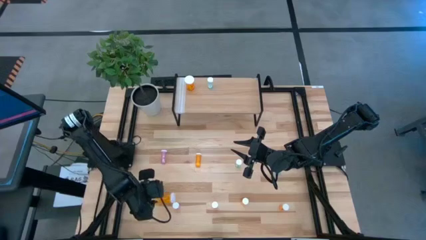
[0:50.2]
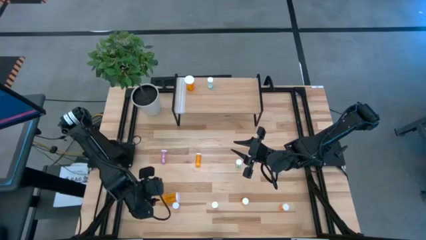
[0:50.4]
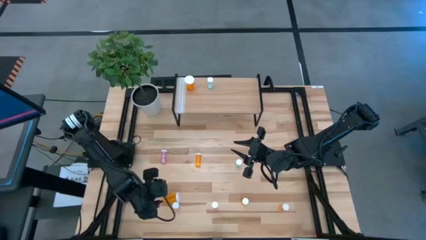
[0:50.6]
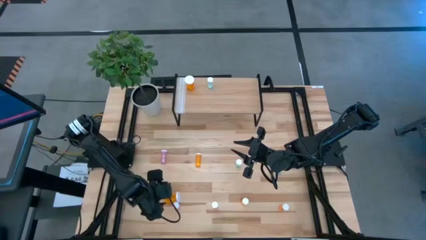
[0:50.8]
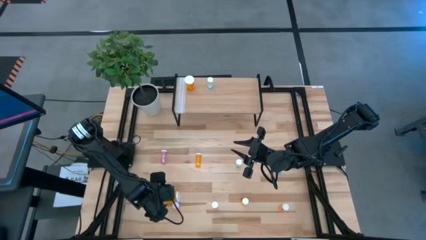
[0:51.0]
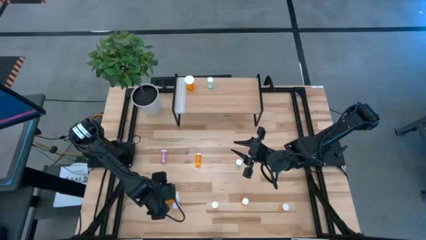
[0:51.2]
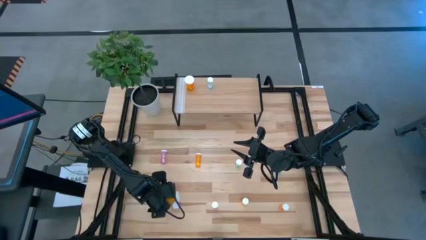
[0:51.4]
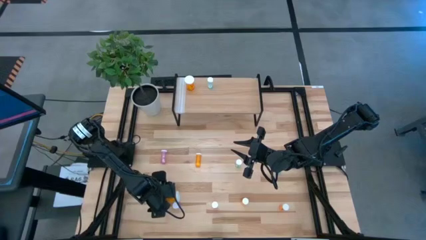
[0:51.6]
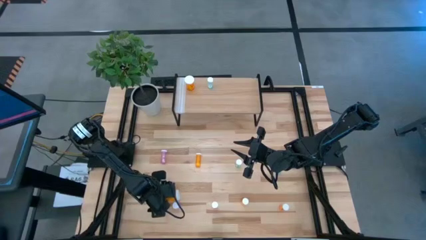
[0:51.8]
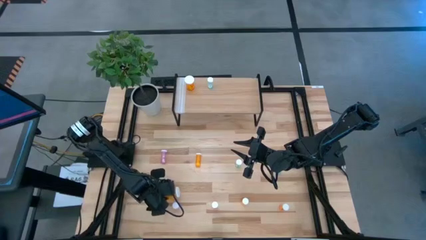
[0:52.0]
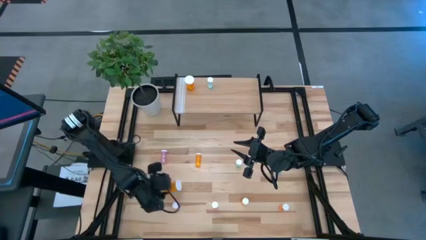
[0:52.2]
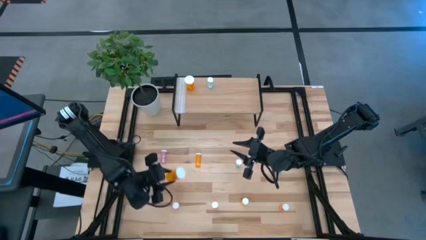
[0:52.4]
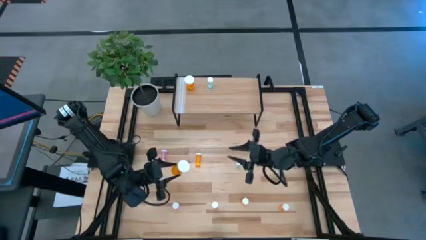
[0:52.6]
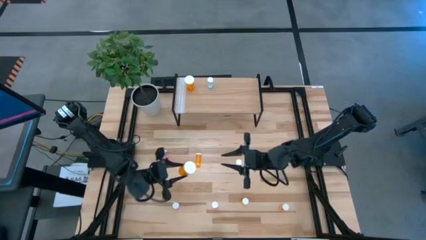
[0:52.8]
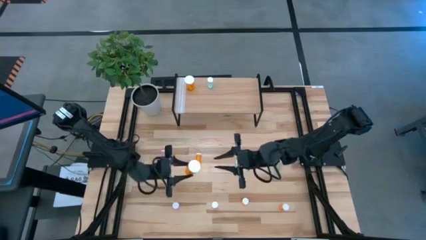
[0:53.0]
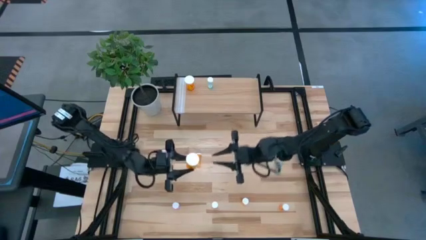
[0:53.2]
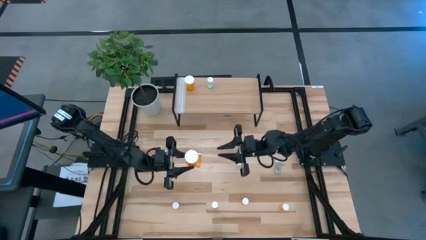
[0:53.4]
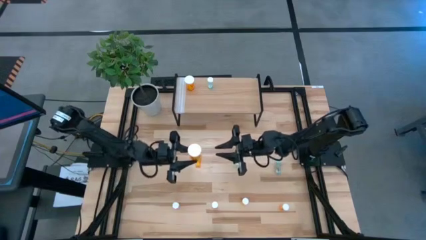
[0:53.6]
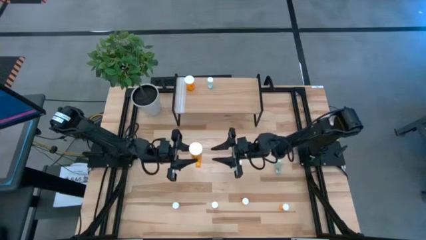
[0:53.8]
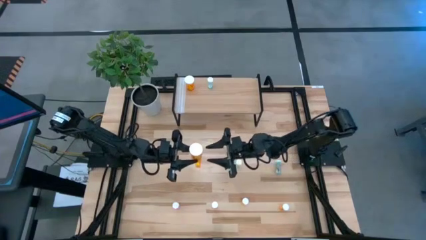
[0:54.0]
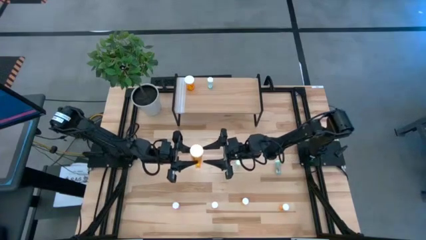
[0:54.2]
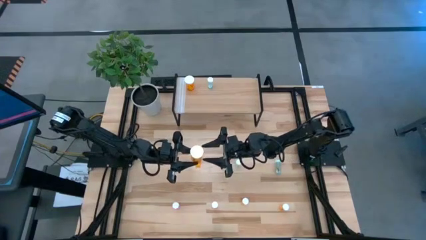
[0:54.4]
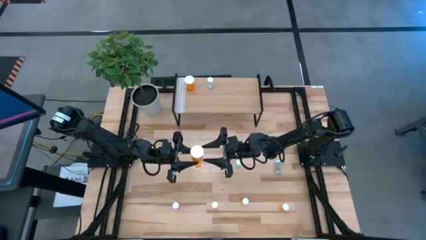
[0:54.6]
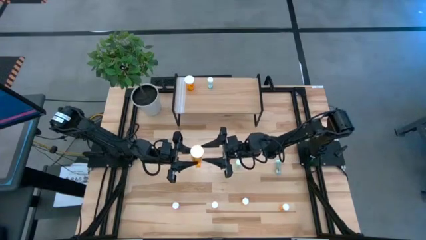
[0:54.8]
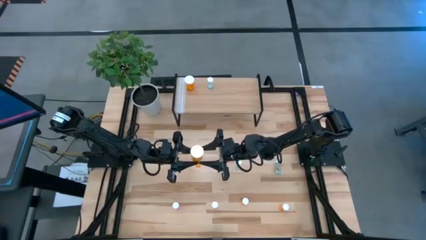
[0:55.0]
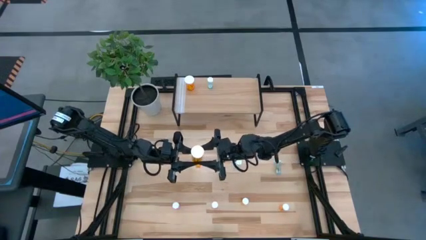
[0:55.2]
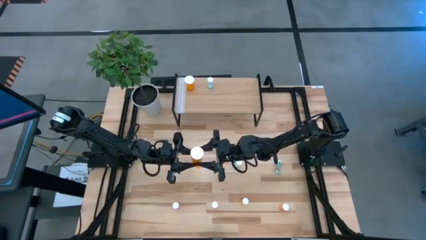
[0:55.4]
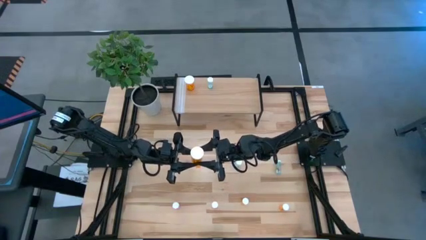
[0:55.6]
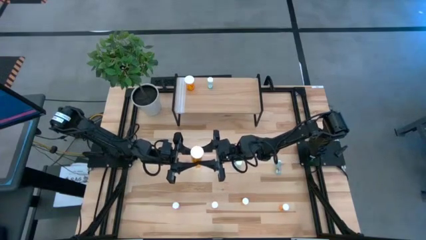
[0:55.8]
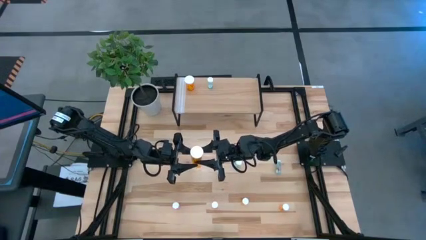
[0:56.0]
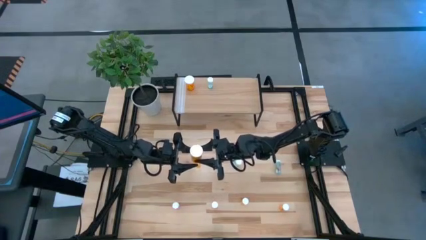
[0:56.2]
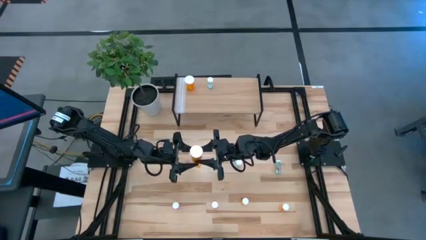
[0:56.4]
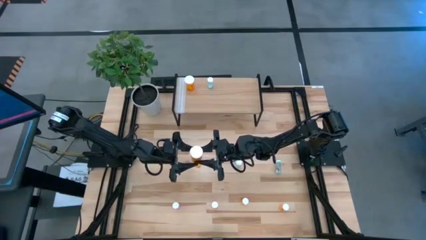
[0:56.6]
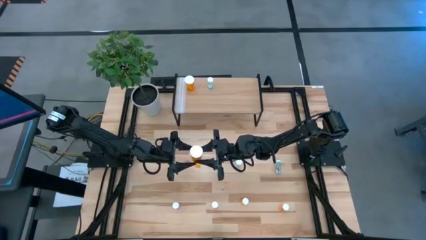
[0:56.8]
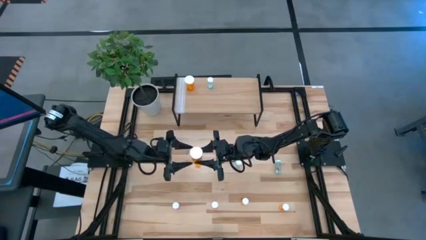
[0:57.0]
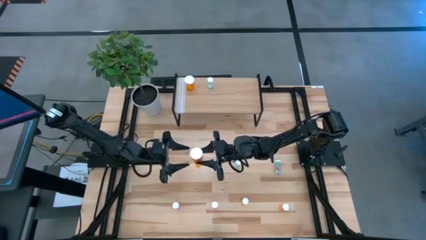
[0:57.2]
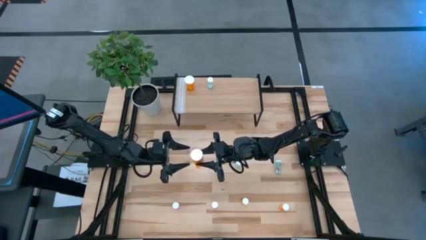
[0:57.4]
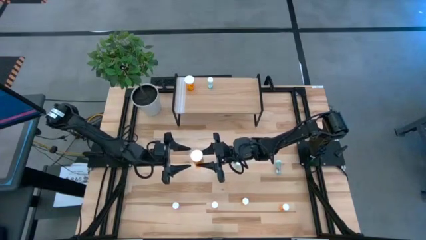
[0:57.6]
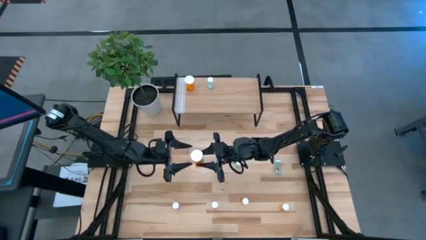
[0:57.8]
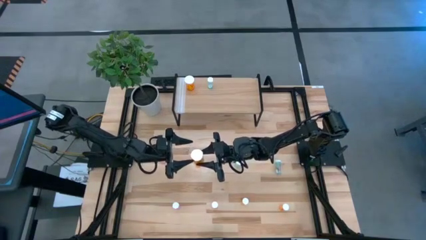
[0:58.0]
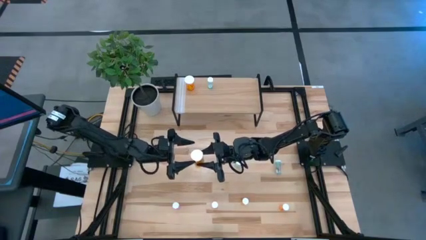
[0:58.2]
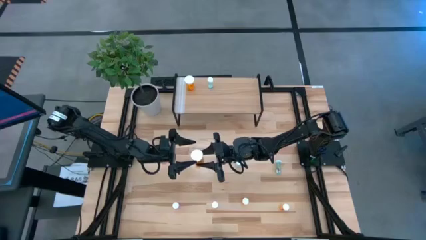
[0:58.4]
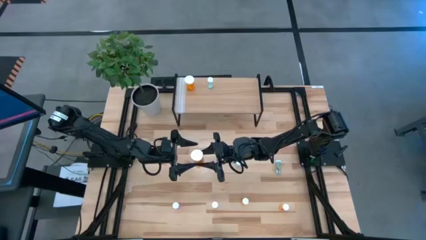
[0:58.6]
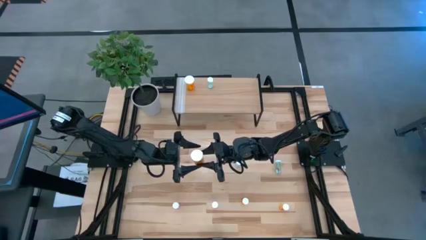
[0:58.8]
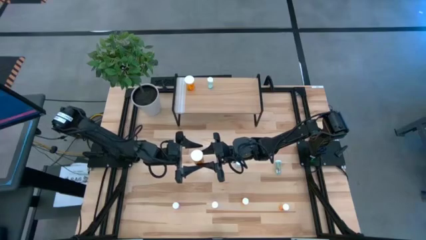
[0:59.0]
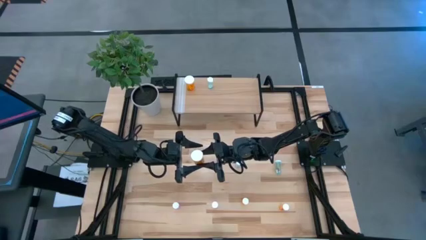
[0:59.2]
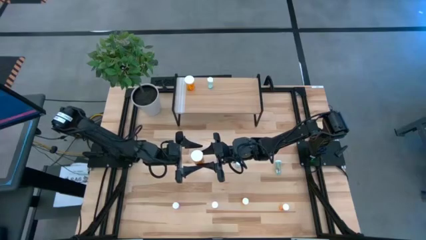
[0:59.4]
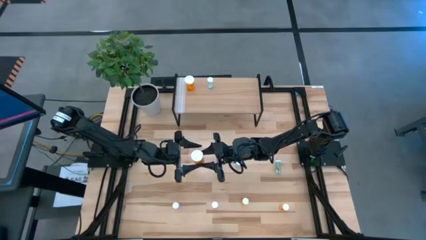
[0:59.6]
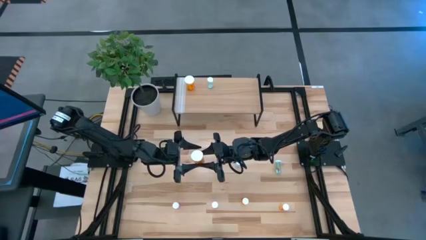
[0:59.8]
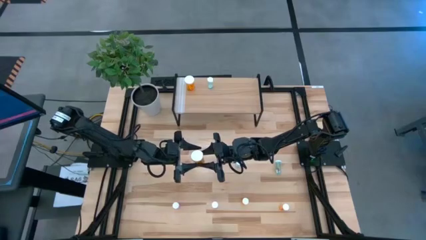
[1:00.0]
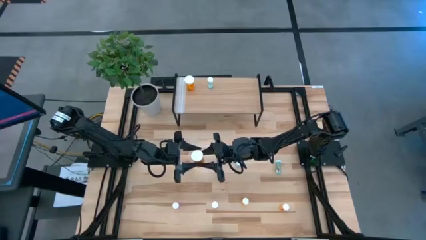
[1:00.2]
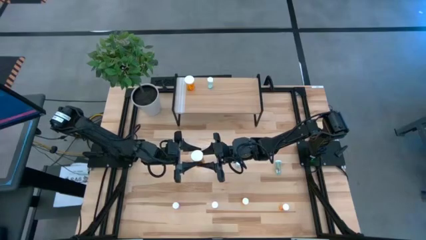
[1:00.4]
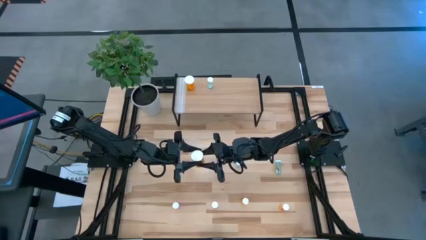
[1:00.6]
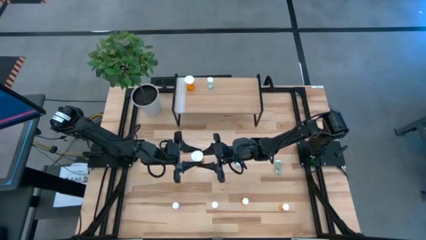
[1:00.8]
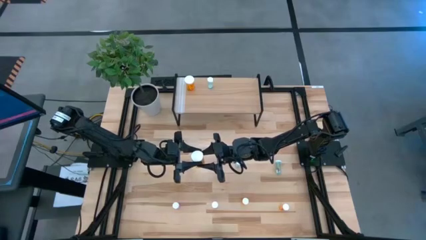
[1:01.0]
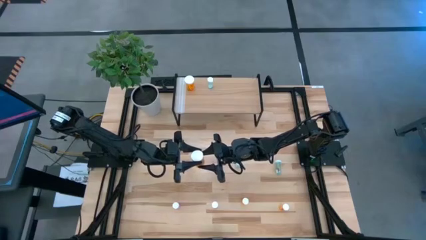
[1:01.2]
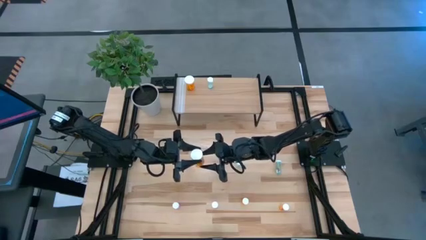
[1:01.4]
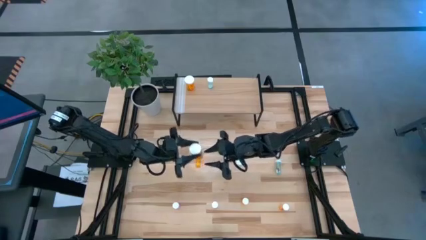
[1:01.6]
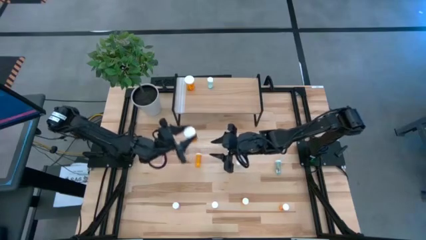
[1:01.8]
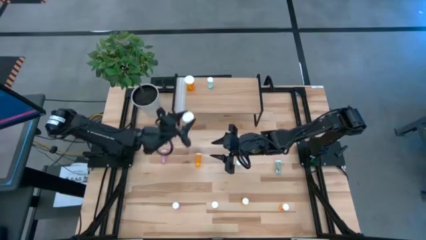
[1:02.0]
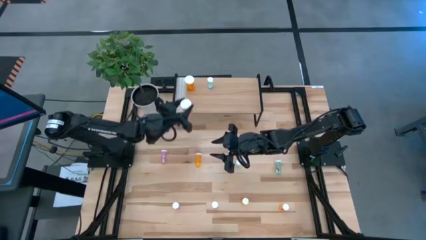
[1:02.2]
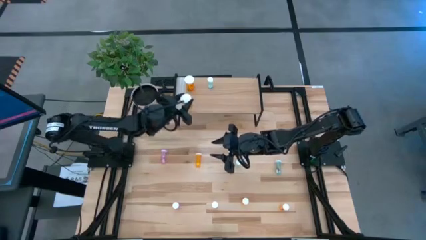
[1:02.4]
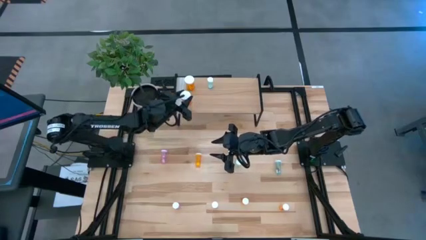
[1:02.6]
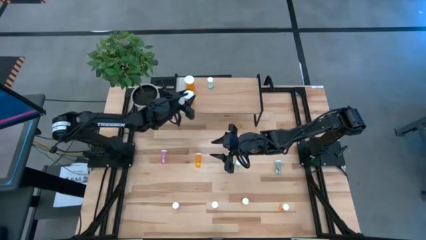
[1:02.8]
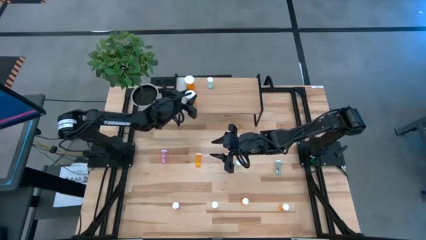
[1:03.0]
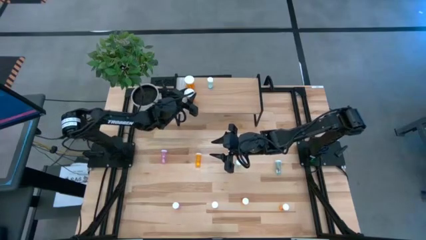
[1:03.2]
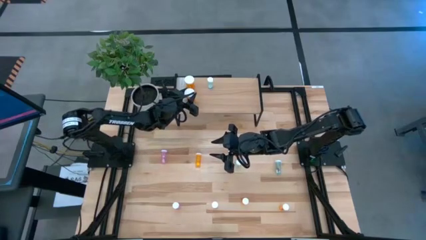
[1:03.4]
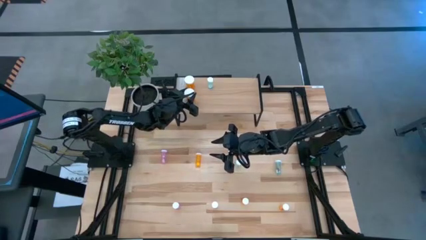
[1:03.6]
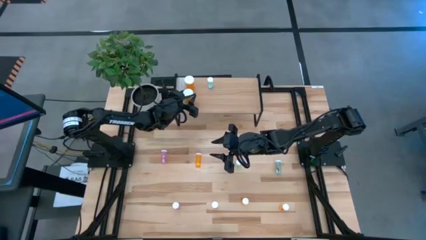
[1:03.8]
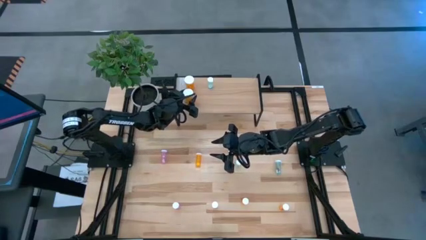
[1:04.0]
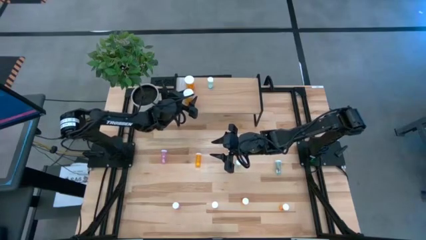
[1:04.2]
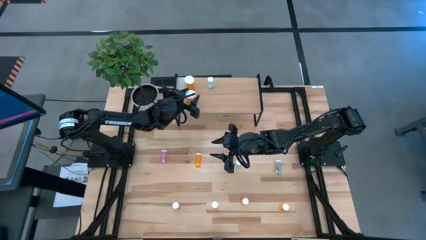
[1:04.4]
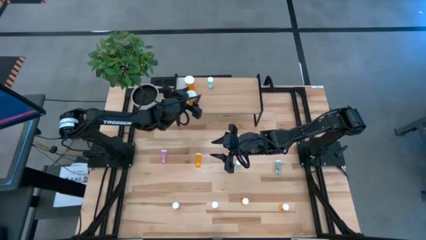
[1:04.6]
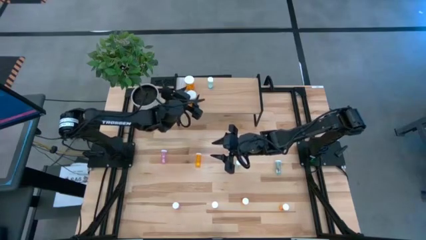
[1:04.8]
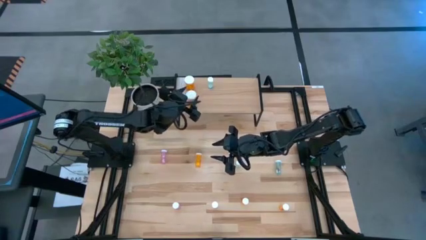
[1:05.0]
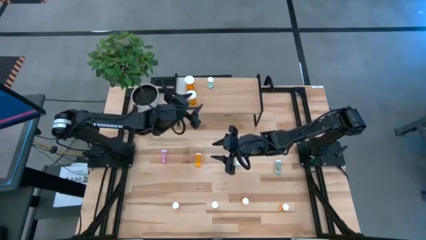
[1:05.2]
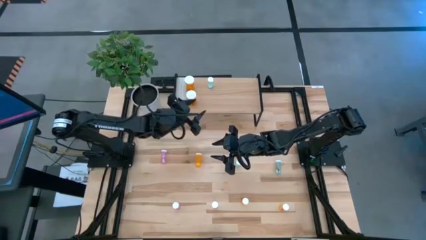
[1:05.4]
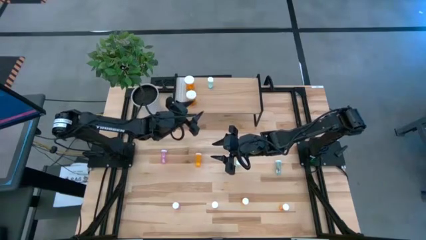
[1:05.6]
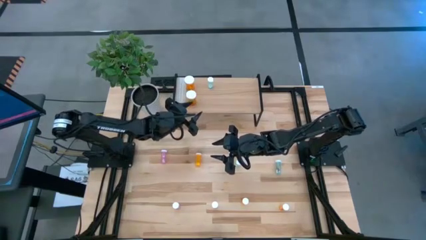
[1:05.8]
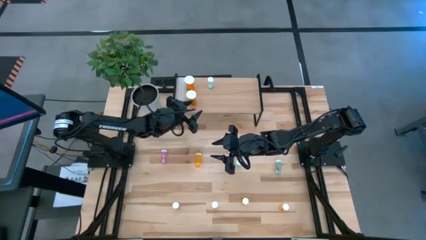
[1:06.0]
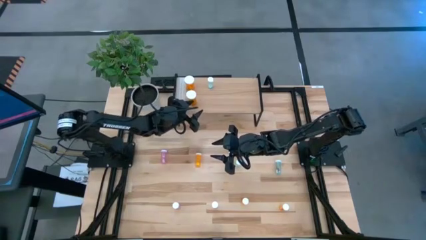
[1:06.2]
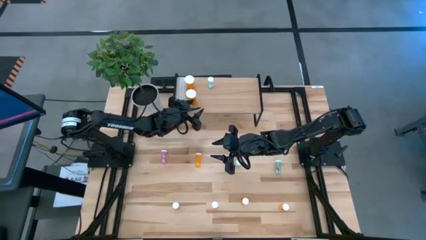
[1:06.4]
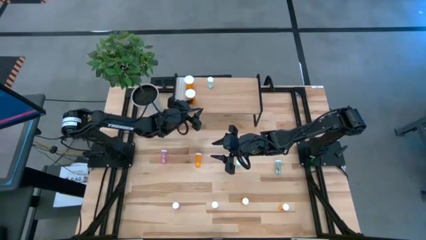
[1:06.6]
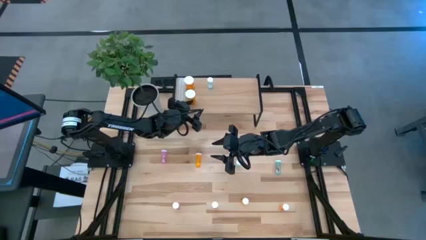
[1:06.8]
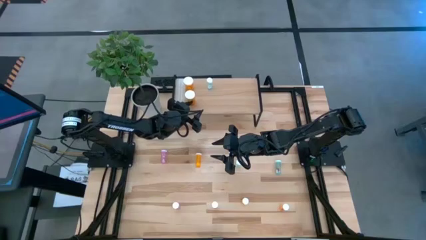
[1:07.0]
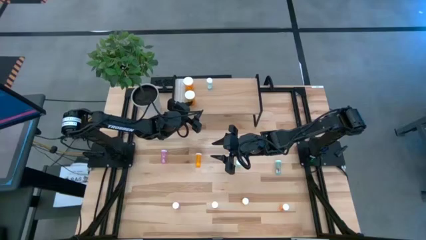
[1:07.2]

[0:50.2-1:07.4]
Task: Pick and place medicine bottles onto shelf by color
Put the large orange pill bottle on the shelf aligned with the other large orange pill bottle
